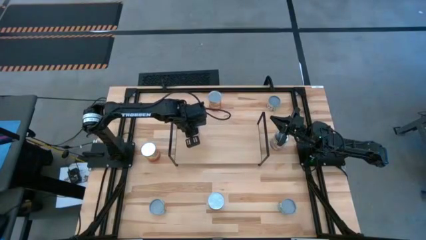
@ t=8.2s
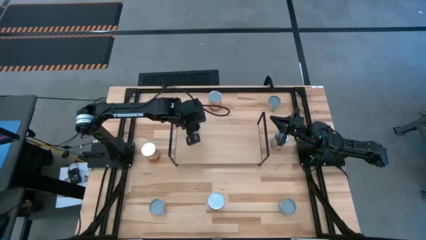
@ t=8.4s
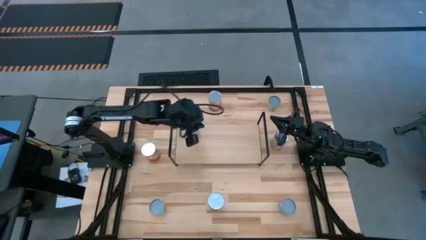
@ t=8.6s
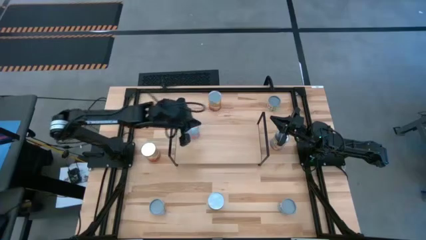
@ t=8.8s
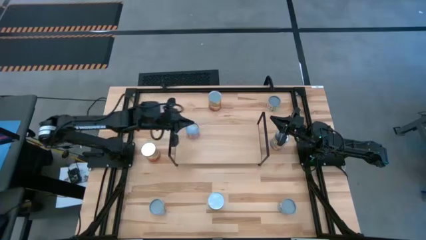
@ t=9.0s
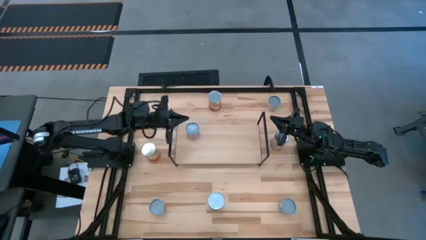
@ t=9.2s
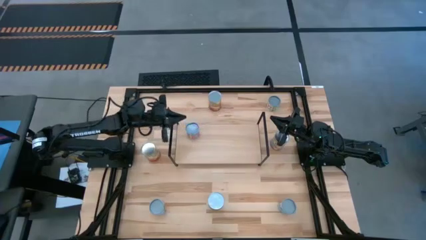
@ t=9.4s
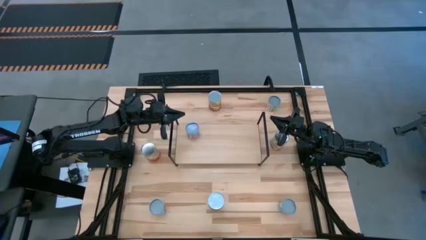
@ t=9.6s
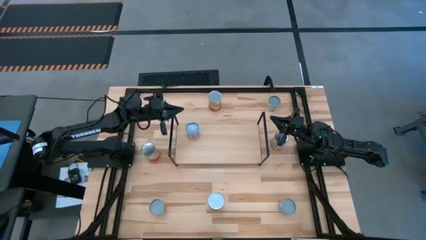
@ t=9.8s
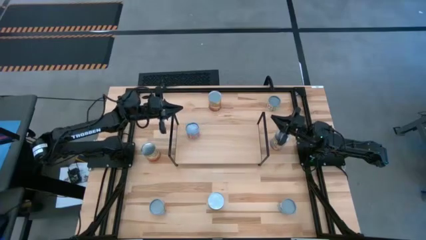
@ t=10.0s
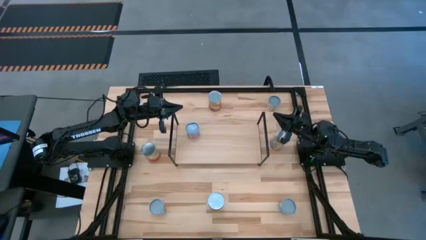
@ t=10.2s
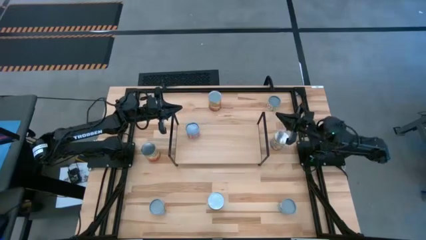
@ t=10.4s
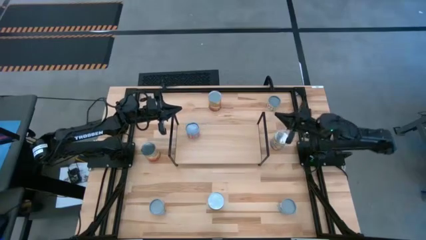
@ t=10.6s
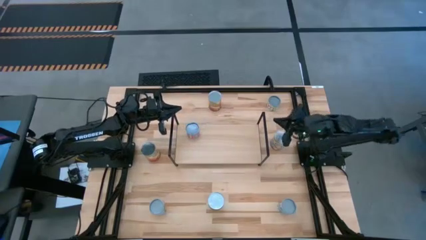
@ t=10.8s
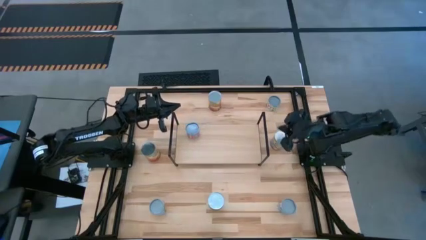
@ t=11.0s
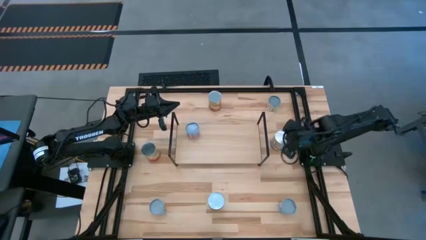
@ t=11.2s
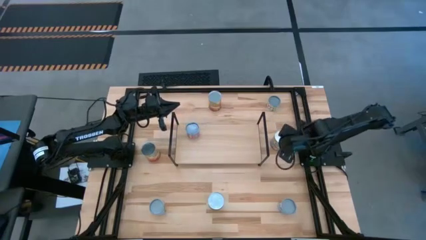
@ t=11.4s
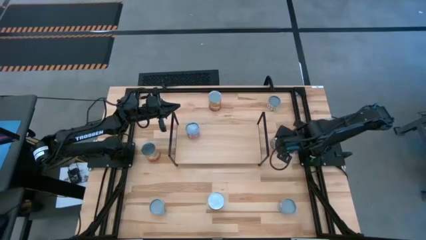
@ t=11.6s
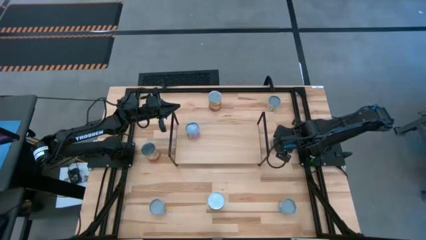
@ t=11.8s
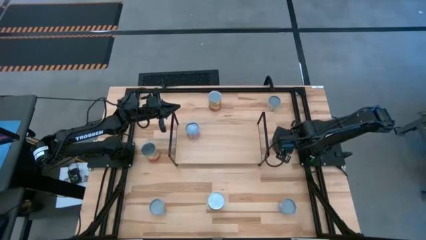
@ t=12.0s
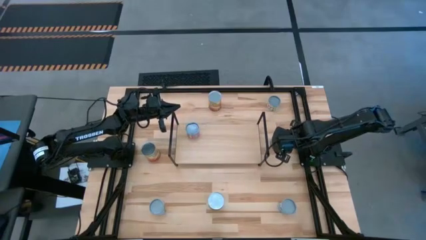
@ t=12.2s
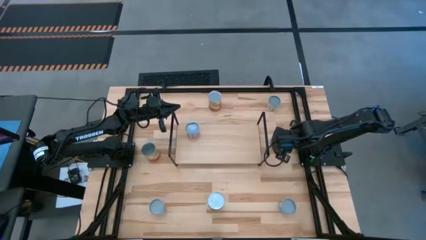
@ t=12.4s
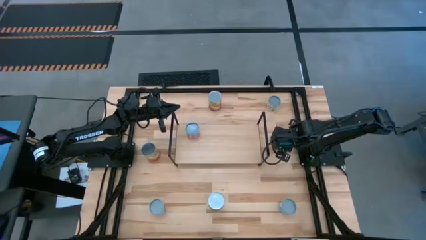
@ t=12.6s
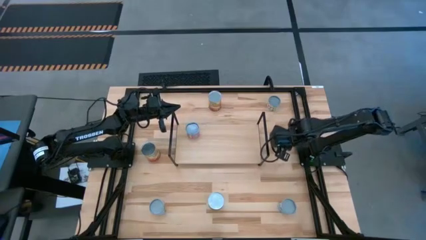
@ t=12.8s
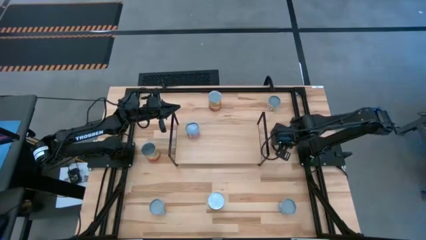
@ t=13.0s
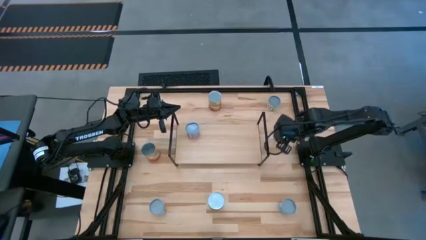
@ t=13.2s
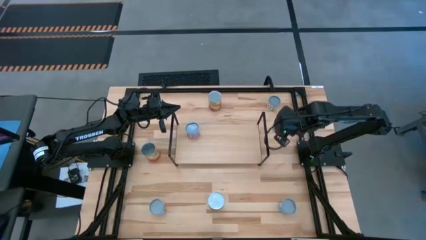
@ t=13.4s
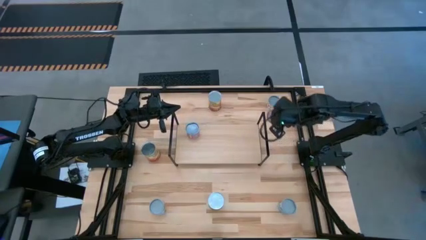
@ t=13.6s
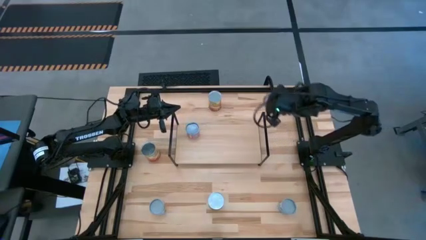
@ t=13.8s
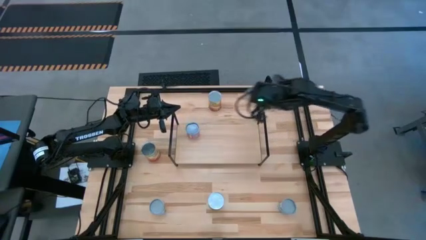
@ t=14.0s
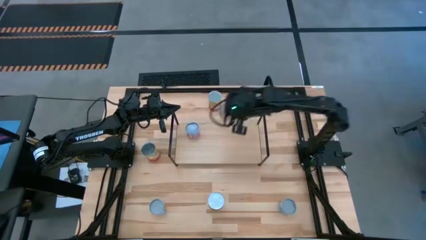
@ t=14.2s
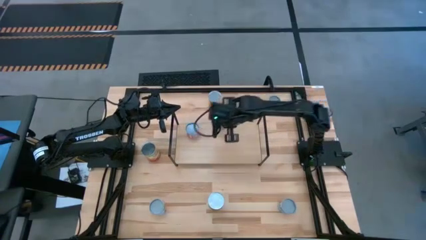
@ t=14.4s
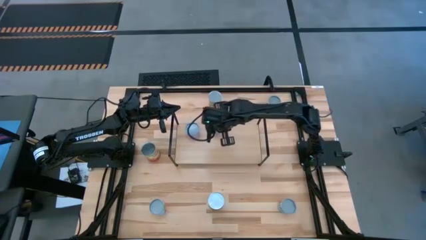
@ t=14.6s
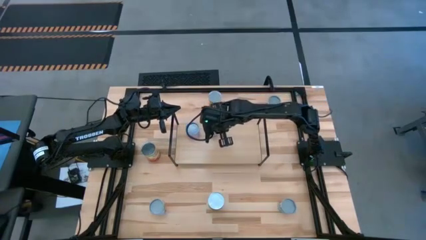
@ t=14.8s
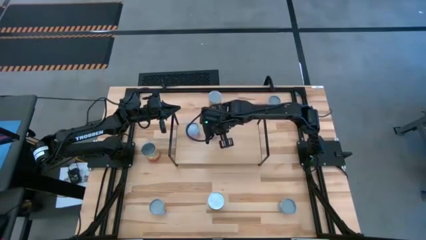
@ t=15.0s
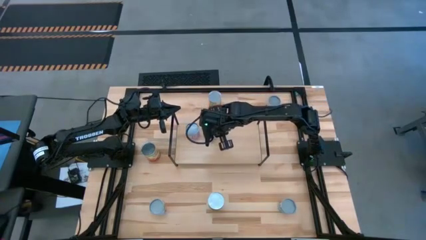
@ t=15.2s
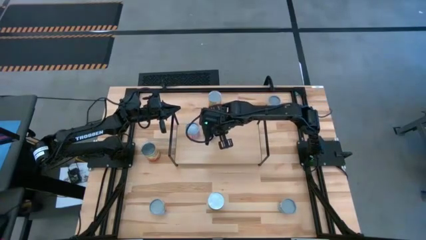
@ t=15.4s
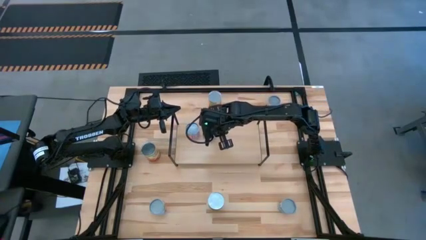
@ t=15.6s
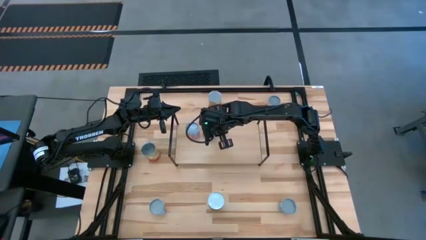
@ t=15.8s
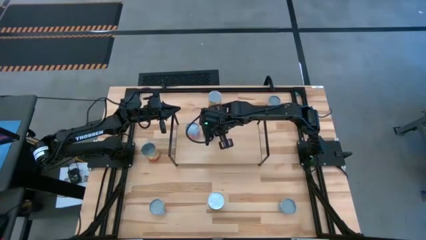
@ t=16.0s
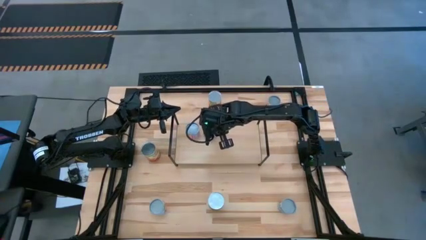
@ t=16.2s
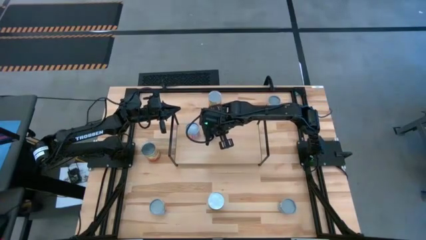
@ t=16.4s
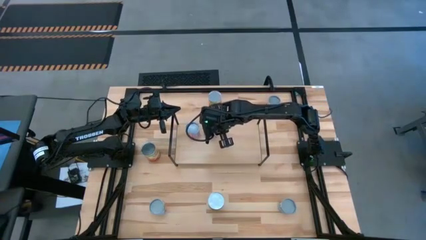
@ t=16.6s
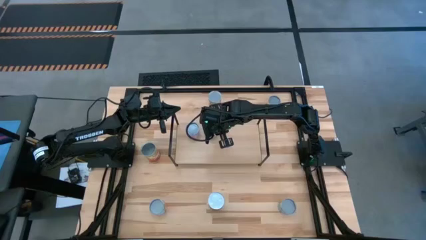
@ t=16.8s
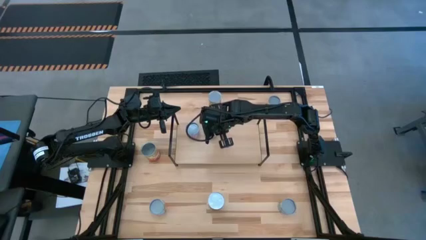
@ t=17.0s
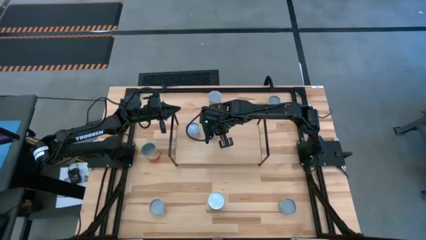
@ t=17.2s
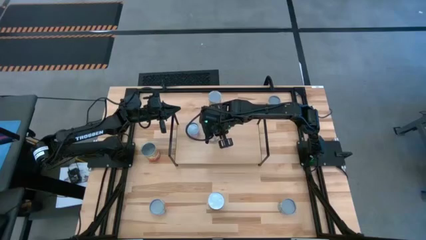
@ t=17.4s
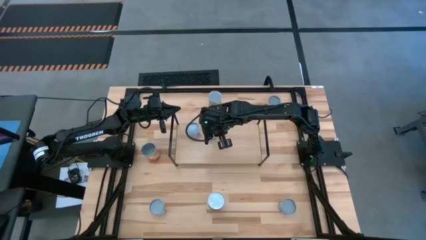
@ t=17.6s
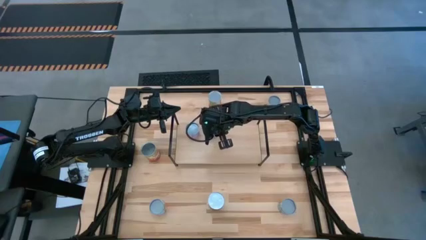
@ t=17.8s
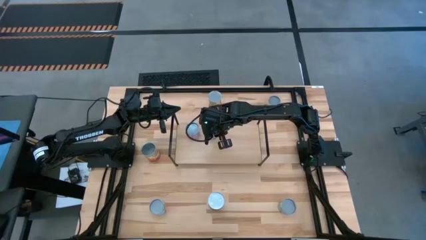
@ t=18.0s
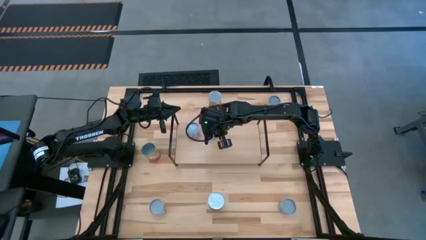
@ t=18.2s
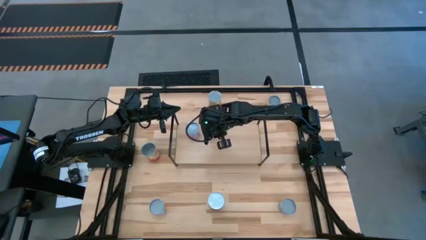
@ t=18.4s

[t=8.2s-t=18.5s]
Task: Pick and place cans onto a shelf
Put the top canned peaches on the shelf

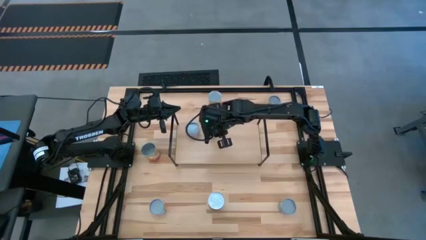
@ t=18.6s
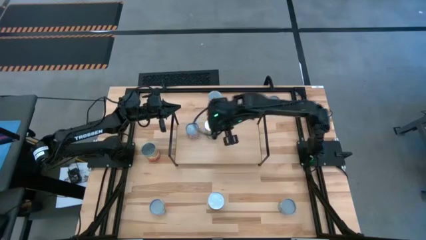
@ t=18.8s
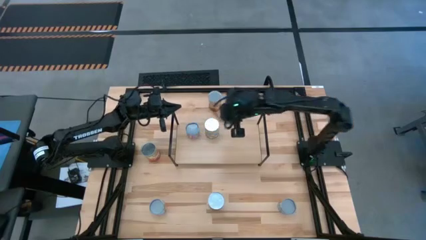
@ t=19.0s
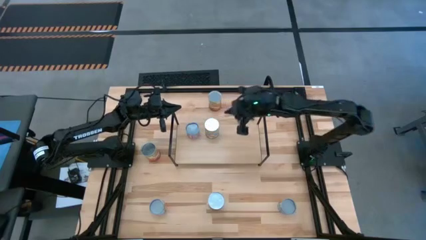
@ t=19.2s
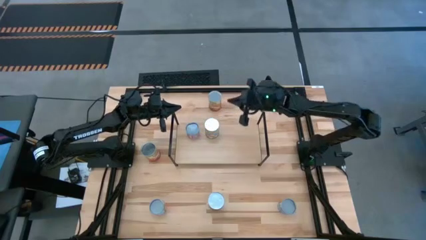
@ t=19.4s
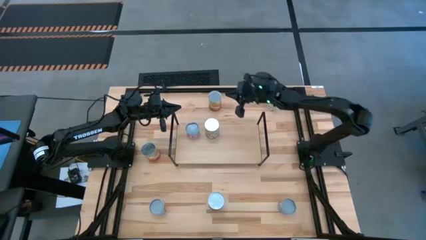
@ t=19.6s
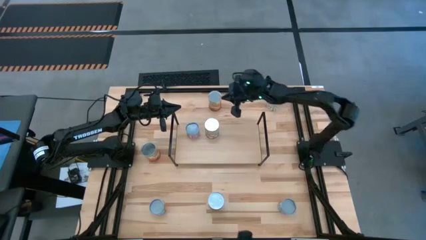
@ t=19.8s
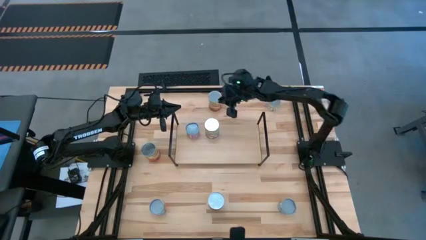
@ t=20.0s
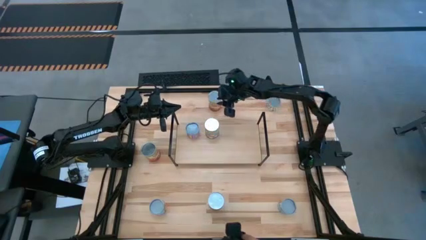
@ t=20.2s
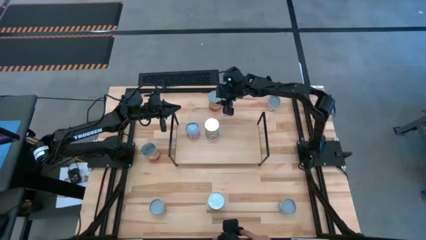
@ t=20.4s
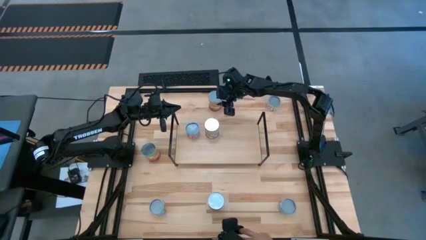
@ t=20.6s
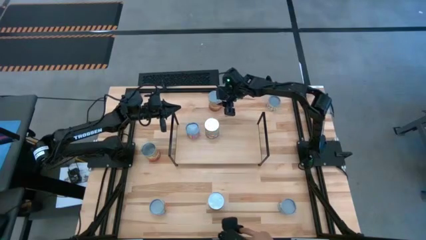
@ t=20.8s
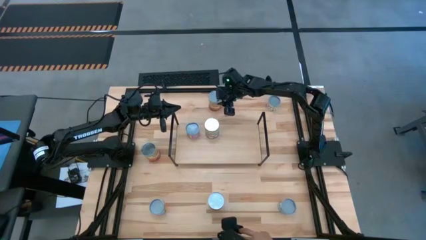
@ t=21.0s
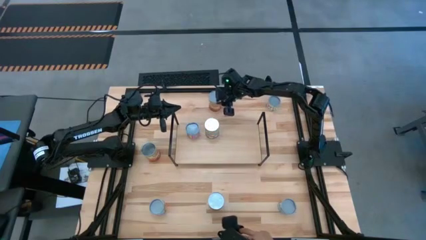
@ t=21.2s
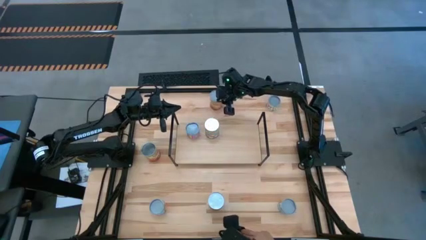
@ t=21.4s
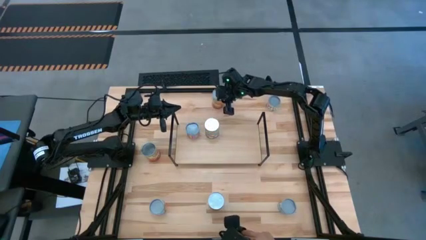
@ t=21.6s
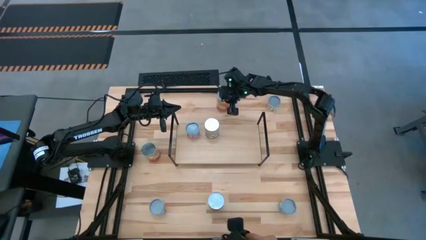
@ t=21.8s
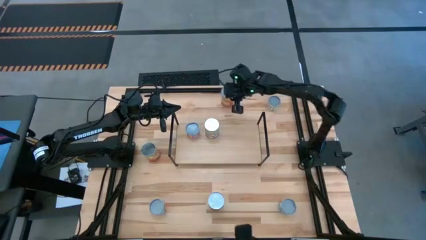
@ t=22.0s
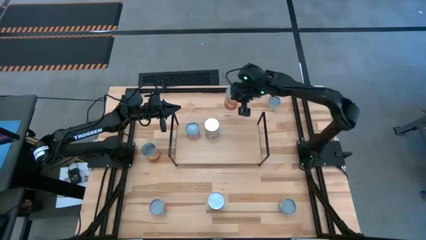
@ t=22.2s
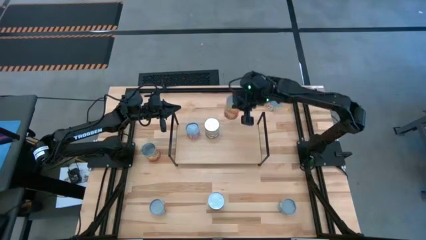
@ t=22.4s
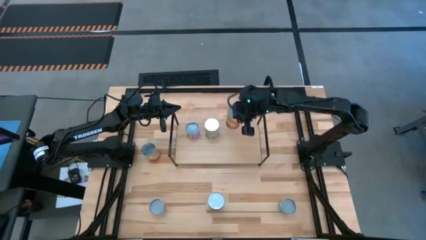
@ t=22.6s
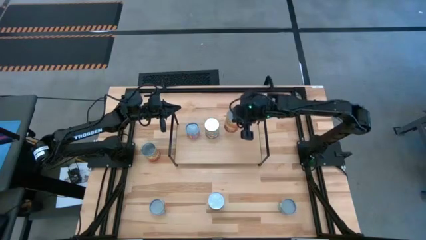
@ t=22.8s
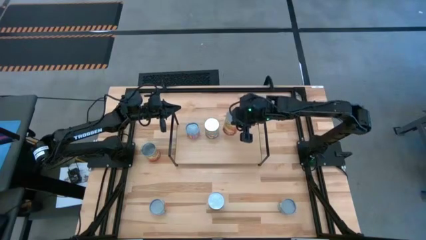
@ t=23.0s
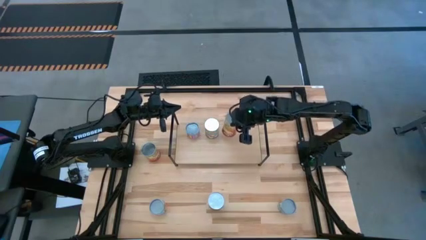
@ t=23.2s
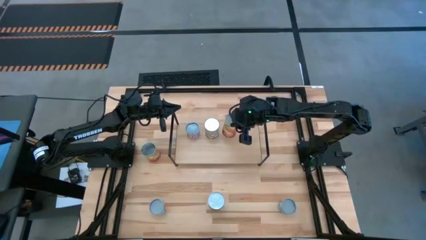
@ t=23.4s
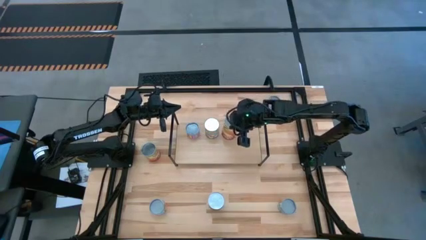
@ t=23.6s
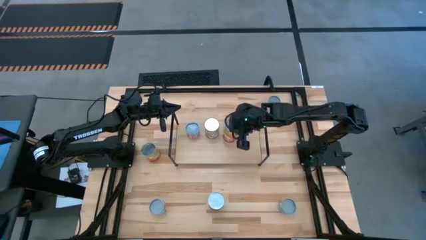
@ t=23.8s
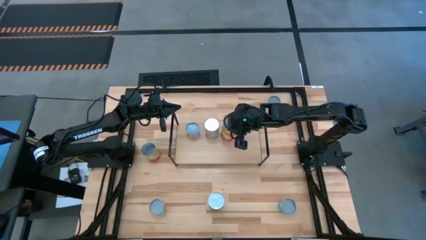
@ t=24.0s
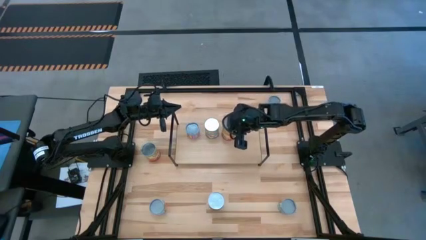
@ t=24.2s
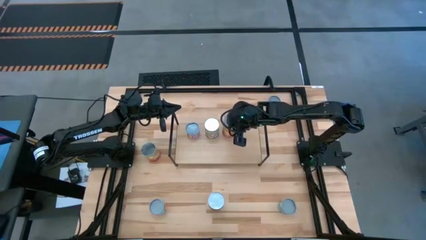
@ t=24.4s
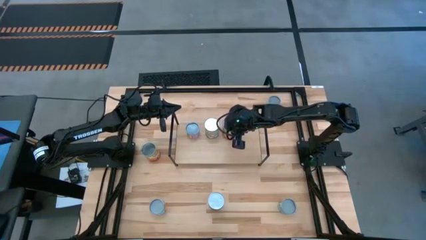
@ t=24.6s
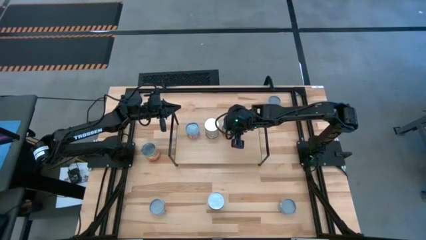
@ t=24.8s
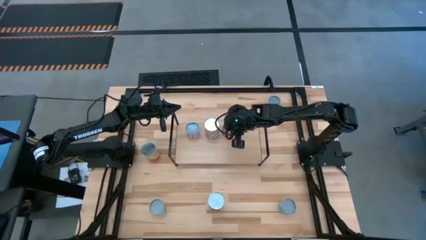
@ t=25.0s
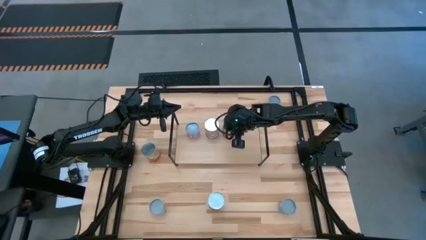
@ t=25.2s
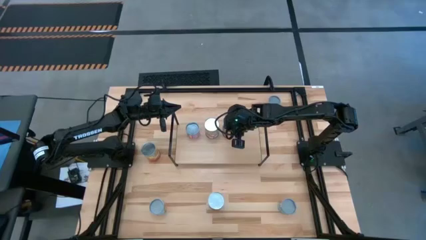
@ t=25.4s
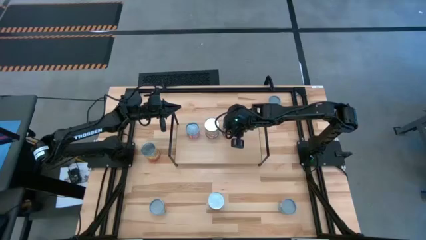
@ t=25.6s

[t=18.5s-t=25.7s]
Put the top canned corn on the shelf
